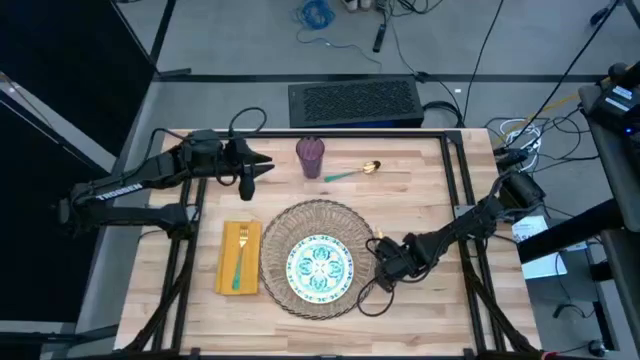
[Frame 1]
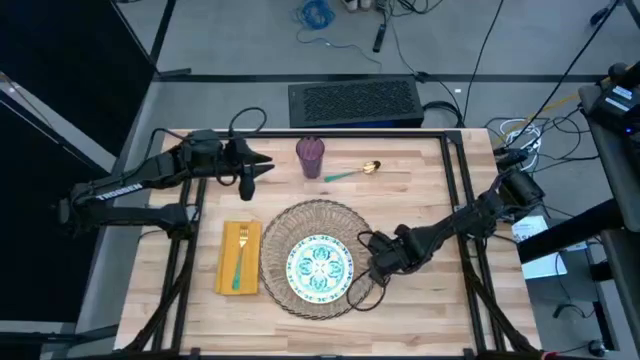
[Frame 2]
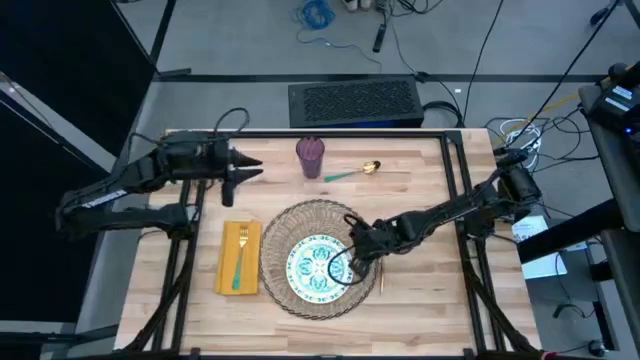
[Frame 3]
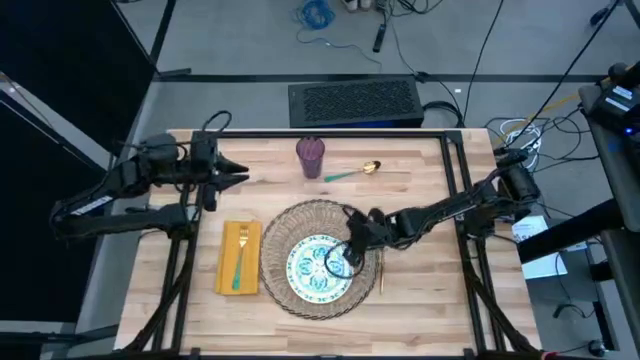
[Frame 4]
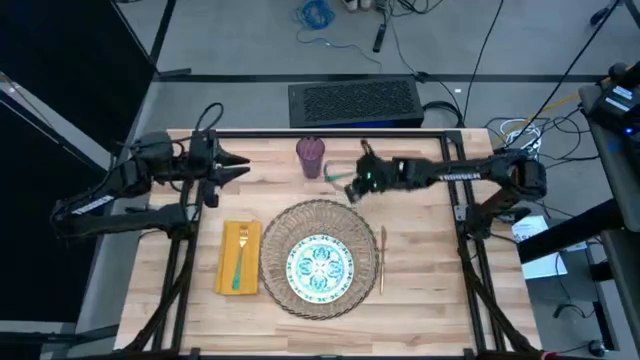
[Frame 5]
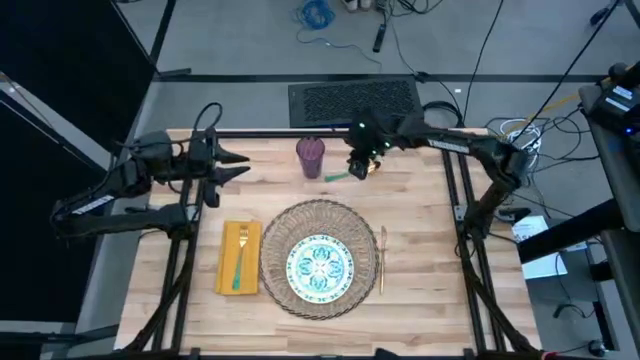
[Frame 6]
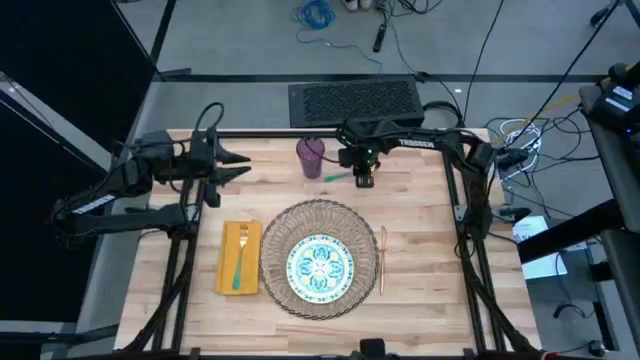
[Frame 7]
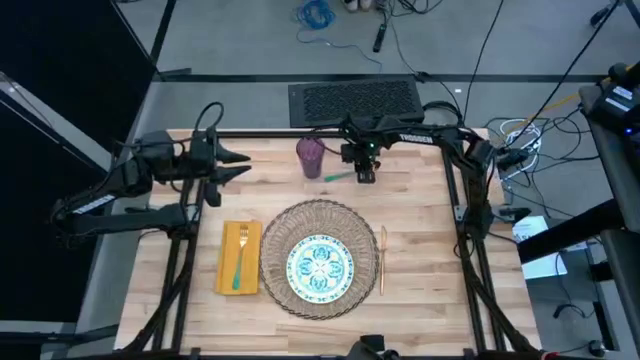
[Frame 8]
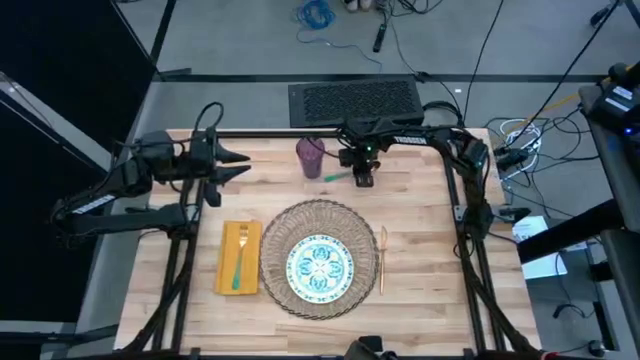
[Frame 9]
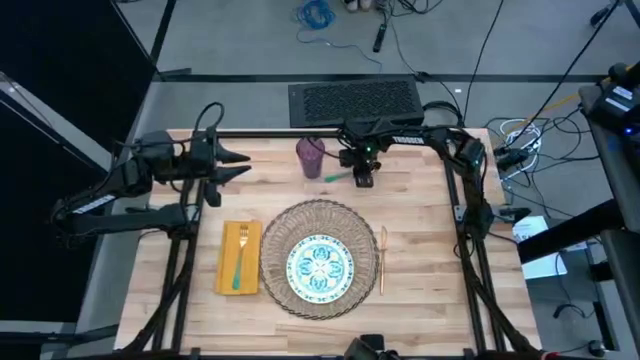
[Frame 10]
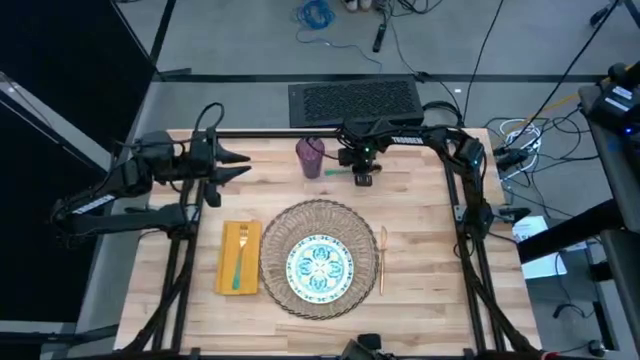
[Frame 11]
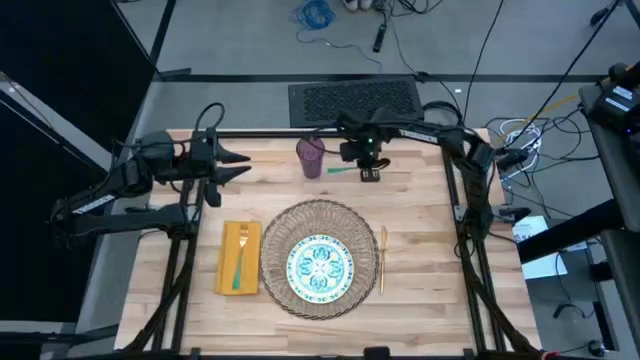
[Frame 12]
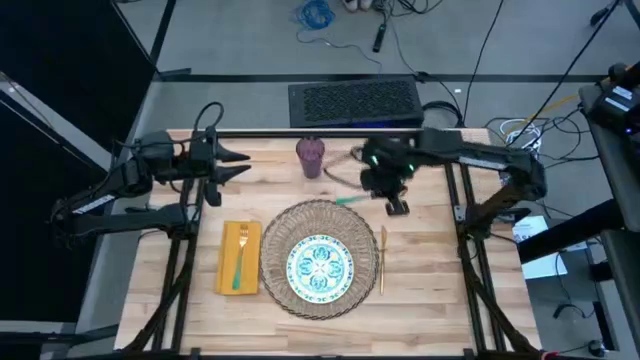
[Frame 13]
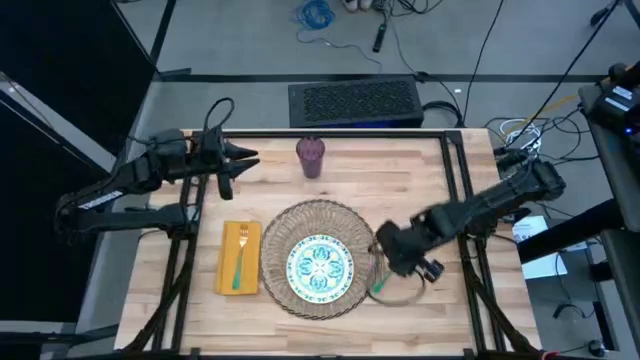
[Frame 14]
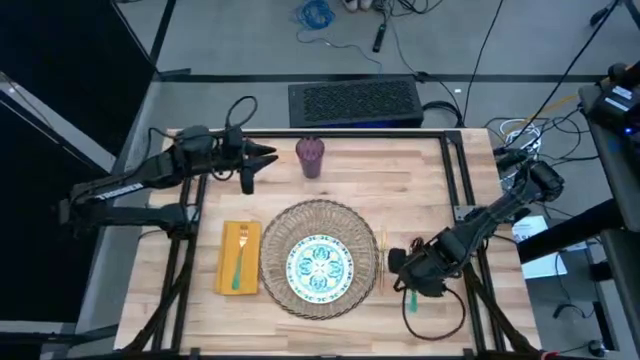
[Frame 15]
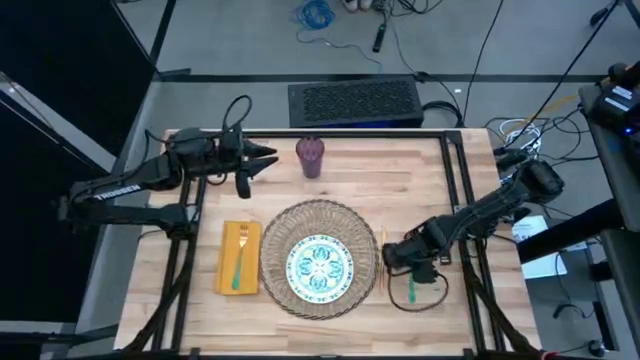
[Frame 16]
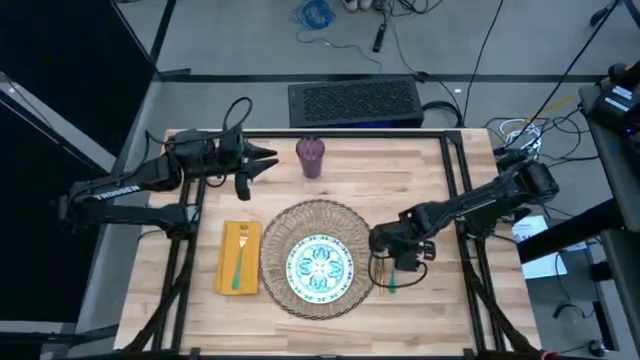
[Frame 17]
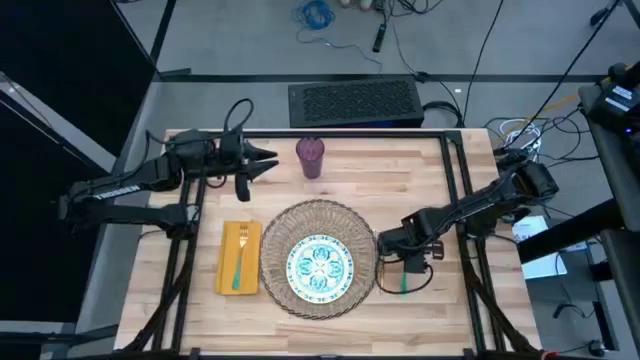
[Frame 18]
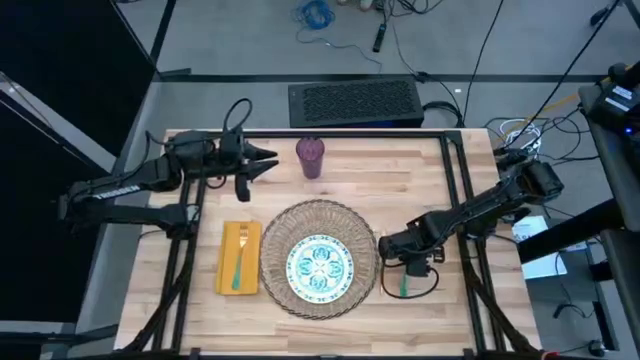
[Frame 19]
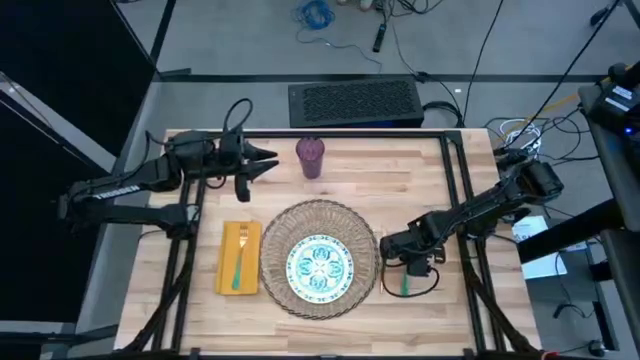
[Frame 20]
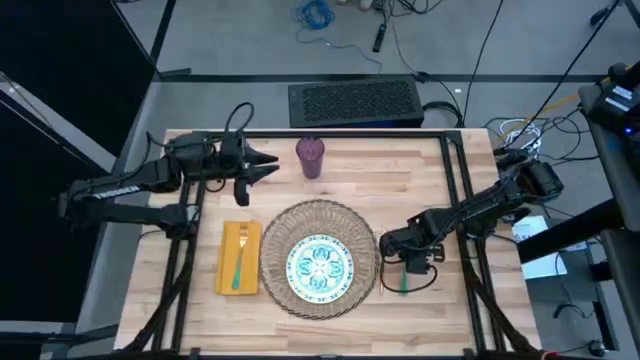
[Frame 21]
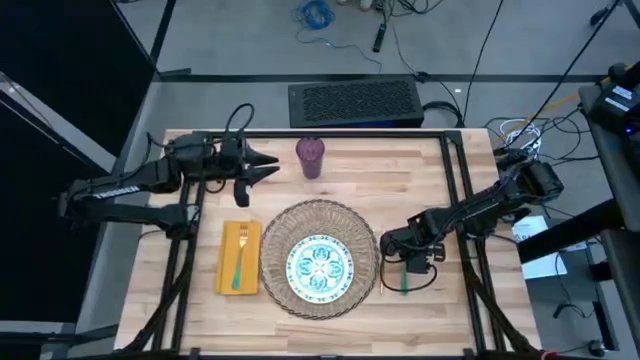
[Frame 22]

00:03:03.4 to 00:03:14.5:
Task: Set table place
Move the green spoon to the right of the gold table knife

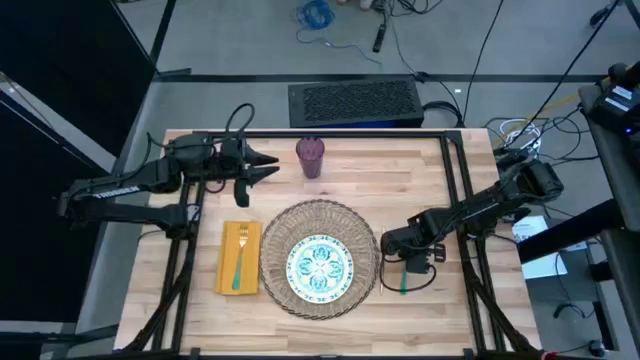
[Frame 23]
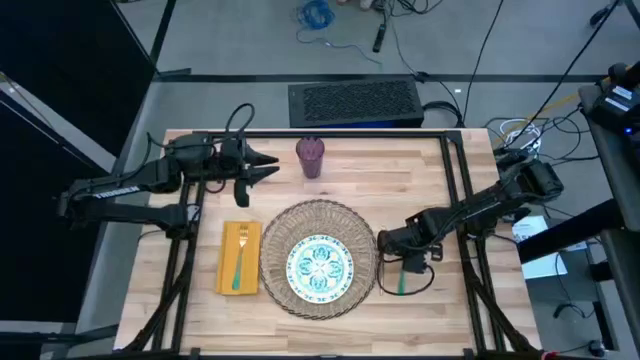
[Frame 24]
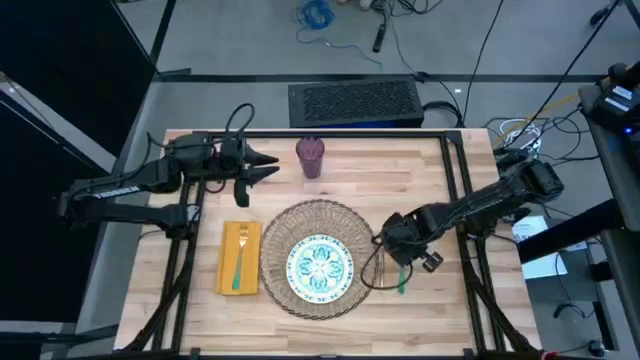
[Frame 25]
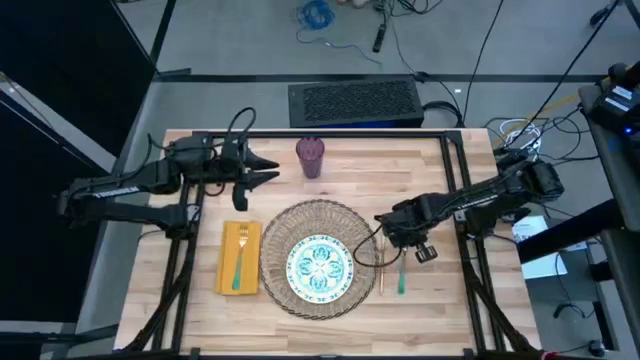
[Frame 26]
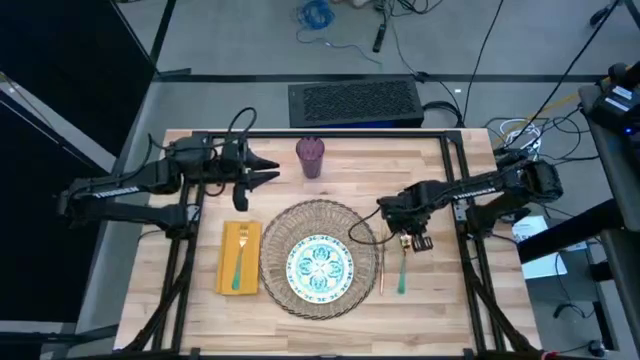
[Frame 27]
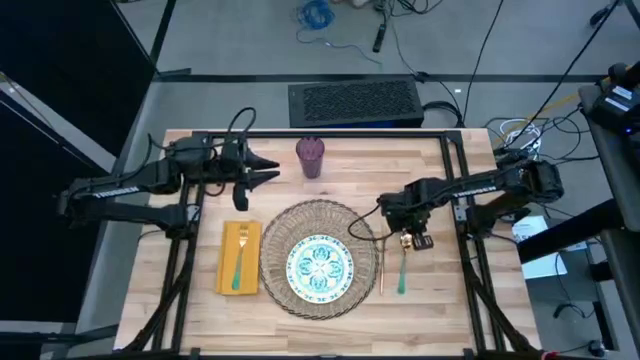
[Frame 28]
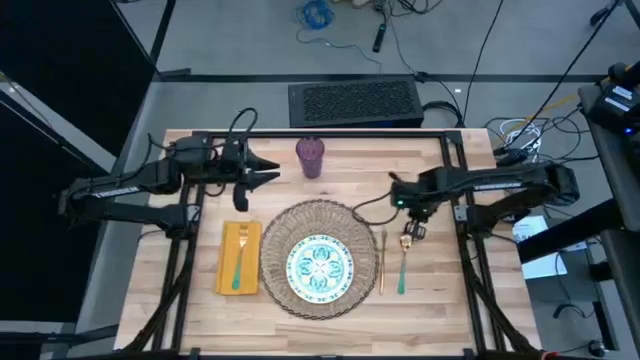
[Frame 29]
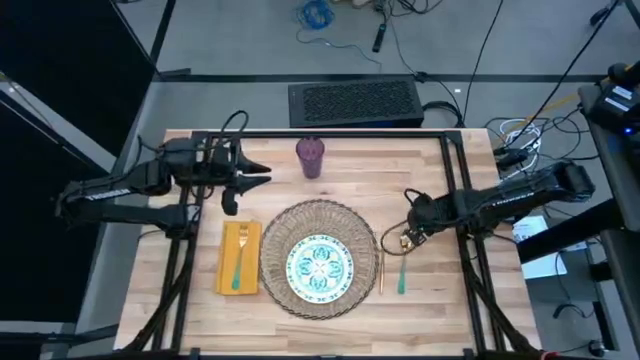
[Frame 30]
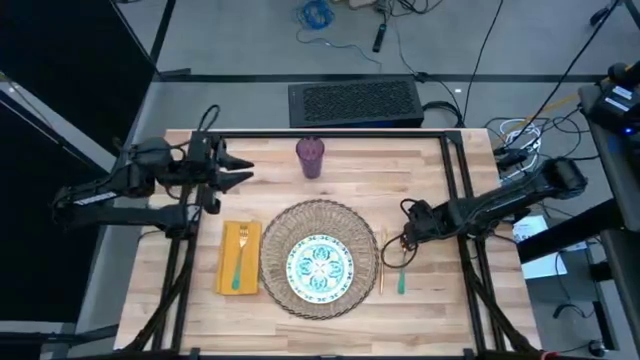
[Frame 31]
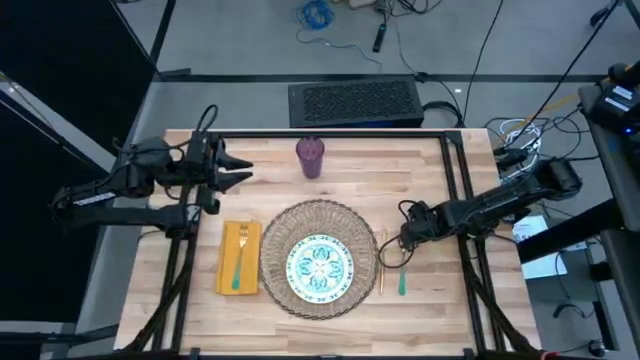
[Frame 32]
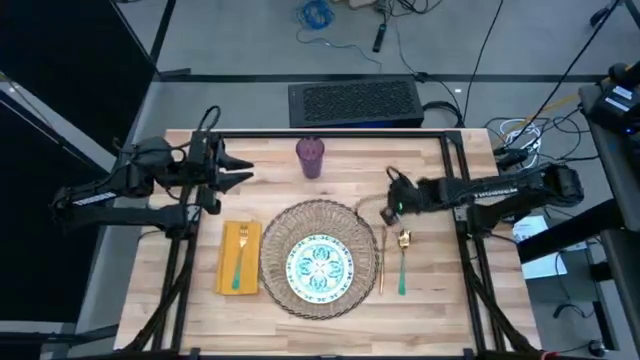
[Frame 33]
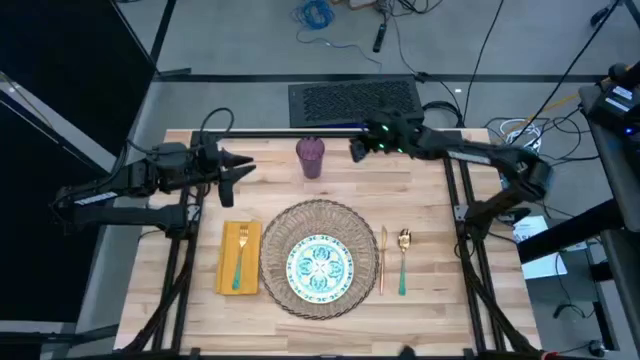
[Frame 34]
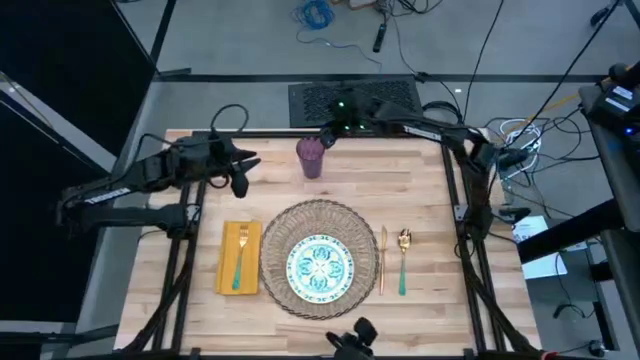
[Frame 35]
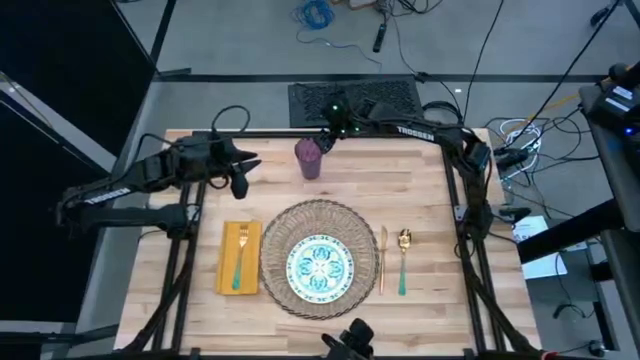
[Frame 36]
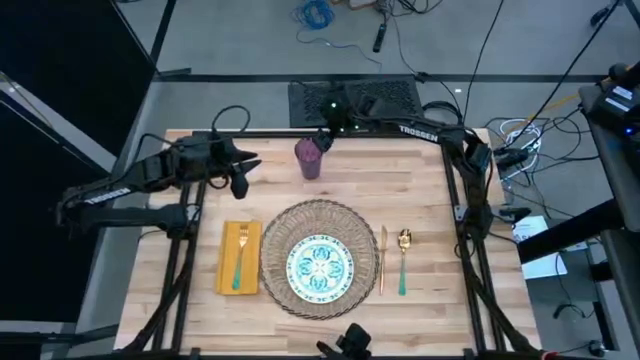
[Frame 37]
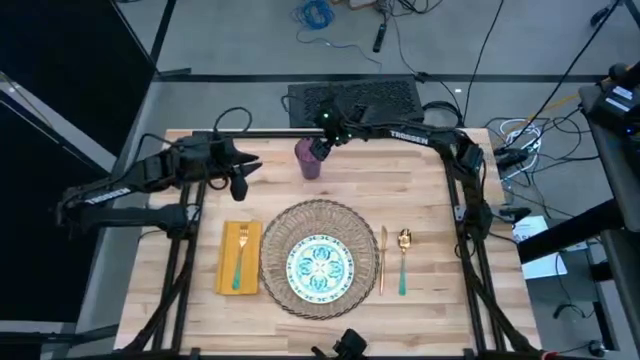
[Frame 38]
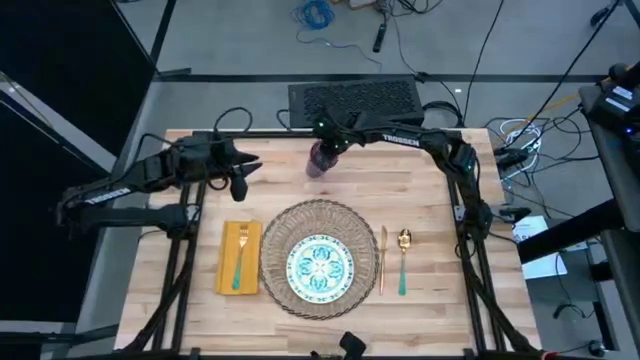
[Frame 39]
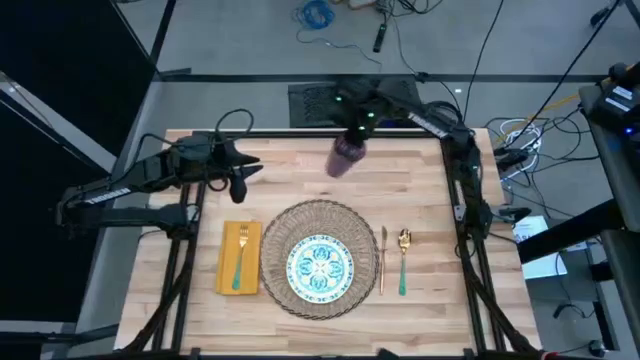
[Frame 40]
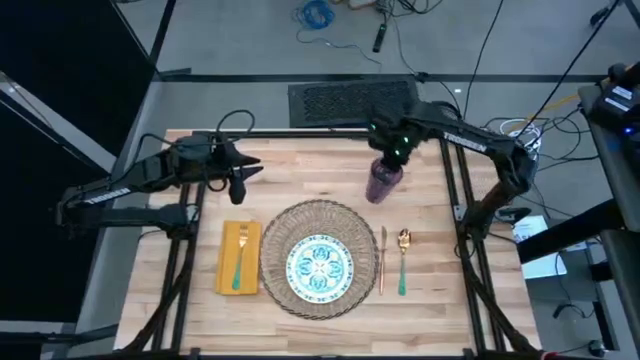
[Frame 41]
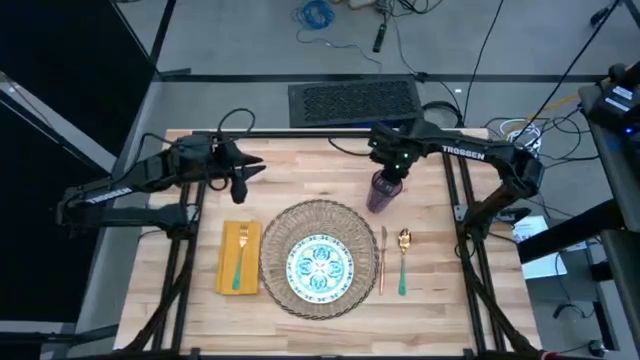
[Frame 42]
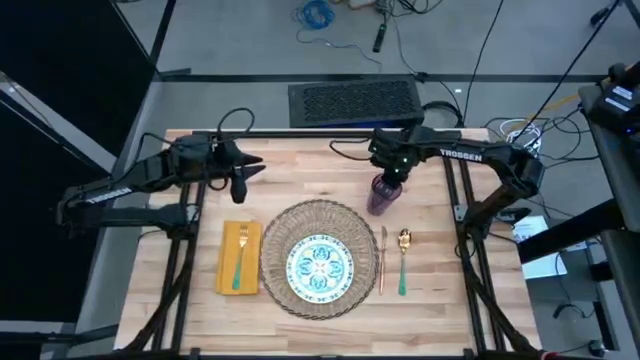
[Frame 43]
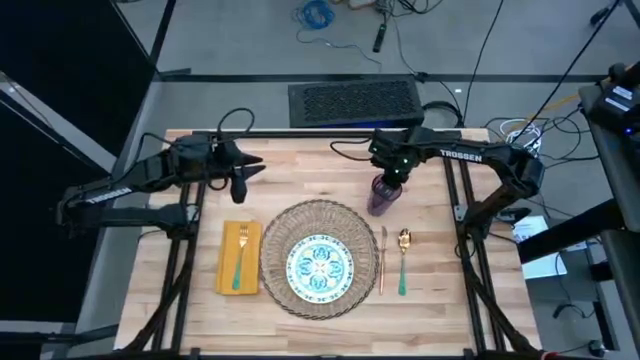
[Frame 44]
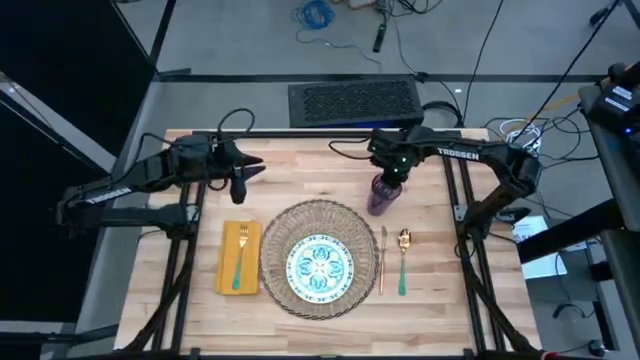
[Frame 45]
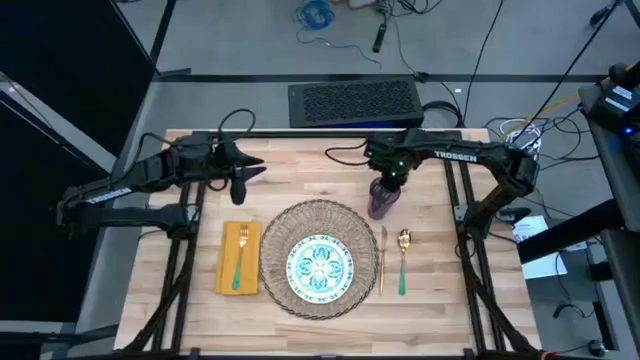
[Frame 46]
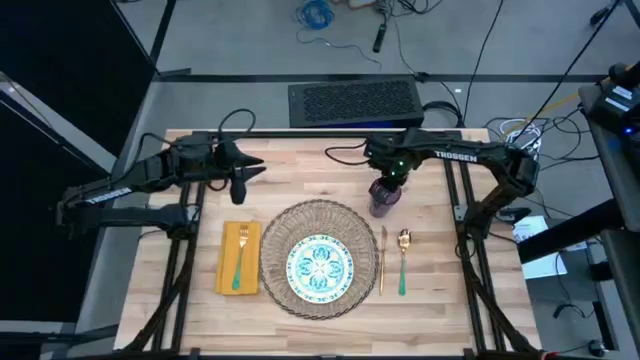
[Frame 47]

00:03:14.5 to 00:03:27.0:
Move the purple cup to the top right of the brown table mat
